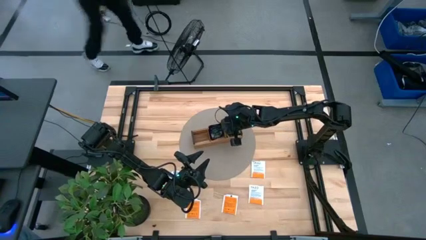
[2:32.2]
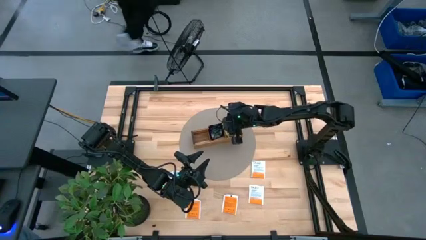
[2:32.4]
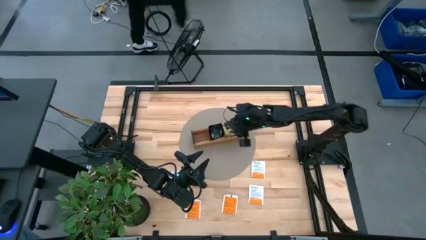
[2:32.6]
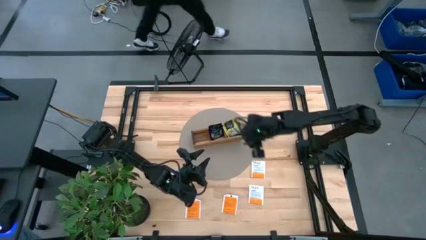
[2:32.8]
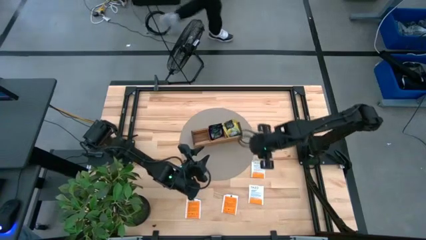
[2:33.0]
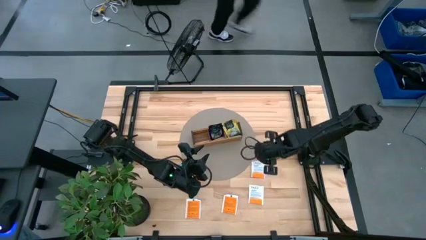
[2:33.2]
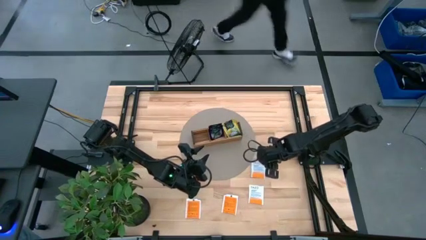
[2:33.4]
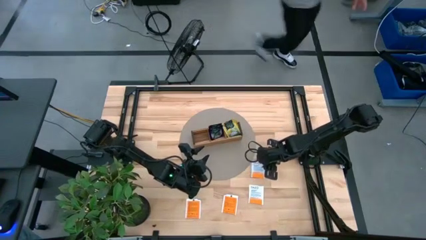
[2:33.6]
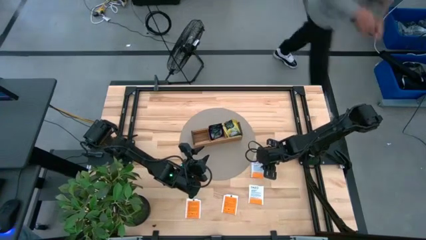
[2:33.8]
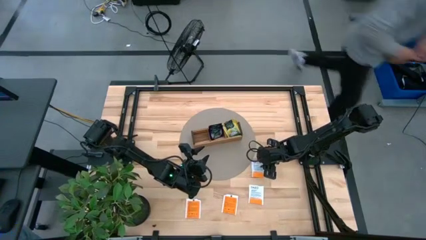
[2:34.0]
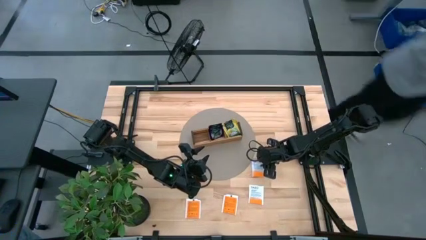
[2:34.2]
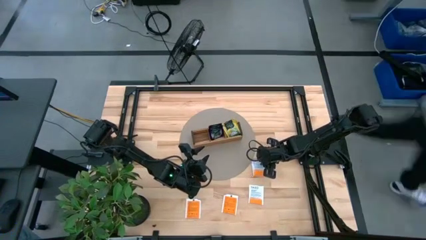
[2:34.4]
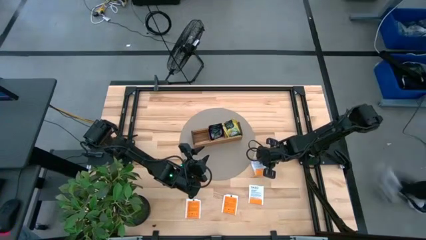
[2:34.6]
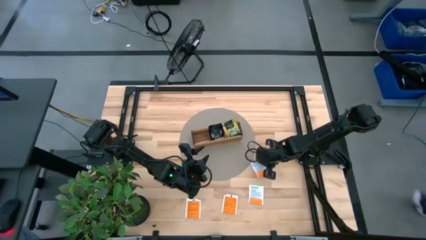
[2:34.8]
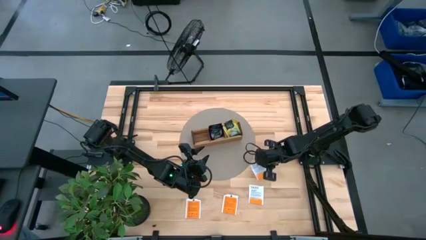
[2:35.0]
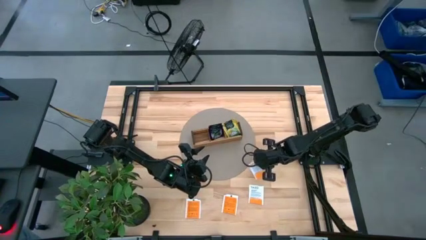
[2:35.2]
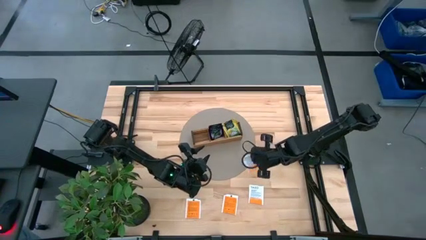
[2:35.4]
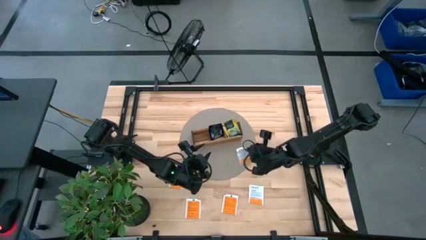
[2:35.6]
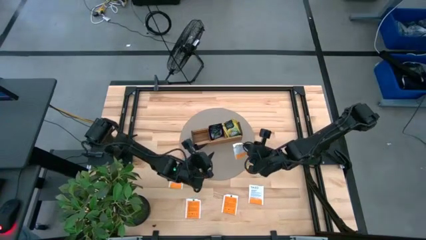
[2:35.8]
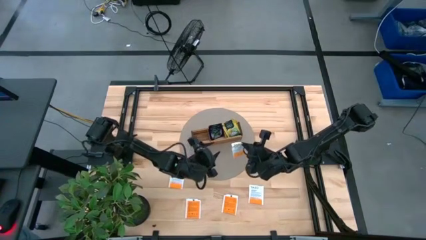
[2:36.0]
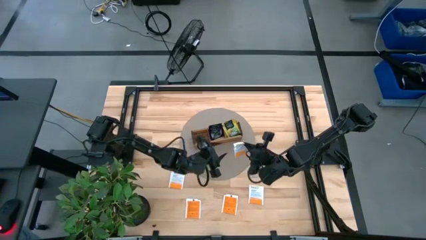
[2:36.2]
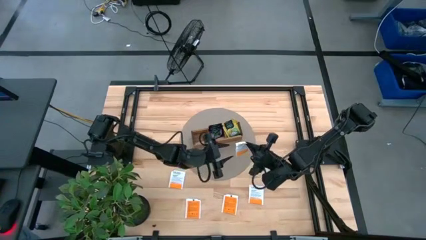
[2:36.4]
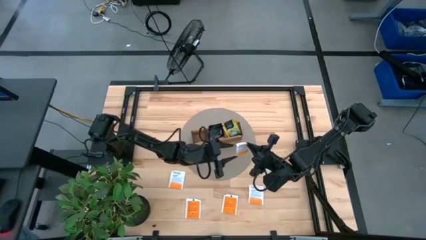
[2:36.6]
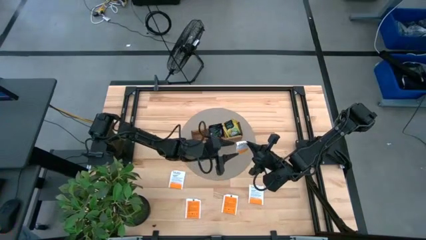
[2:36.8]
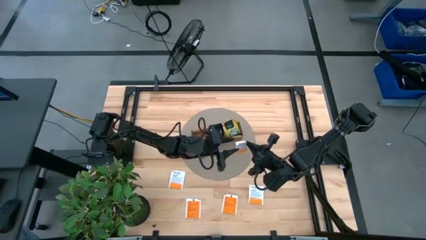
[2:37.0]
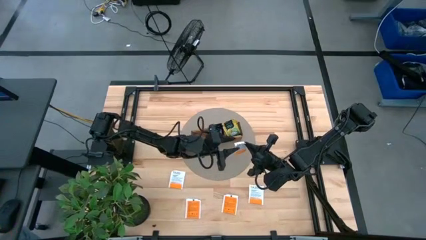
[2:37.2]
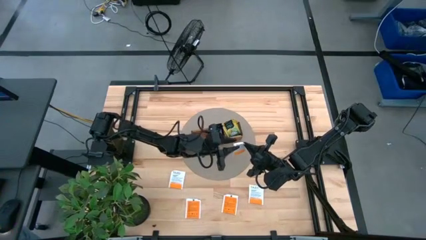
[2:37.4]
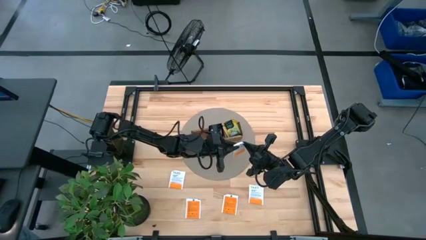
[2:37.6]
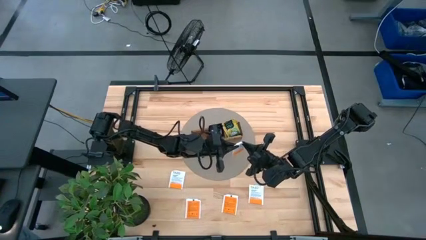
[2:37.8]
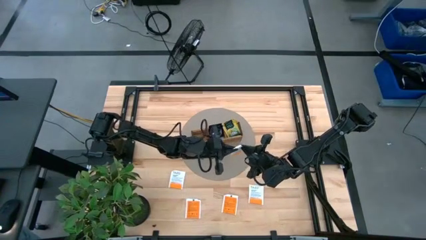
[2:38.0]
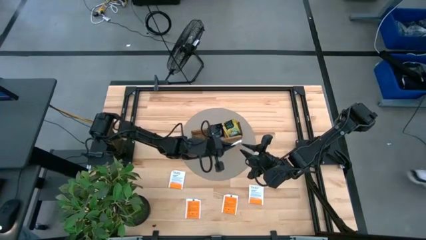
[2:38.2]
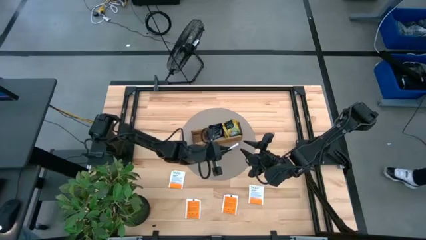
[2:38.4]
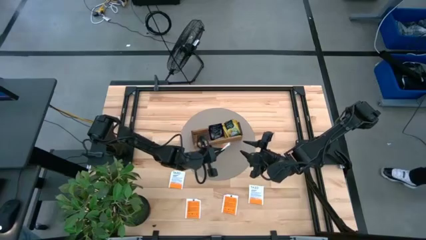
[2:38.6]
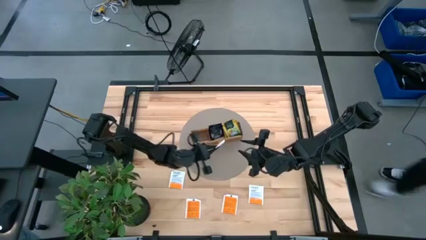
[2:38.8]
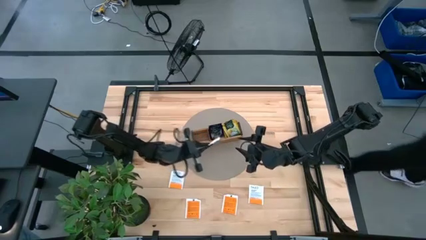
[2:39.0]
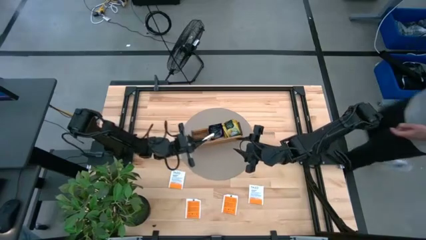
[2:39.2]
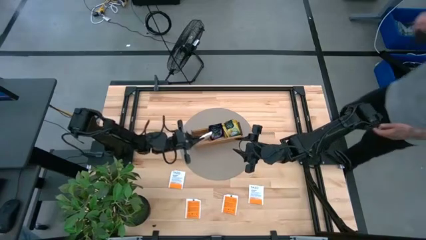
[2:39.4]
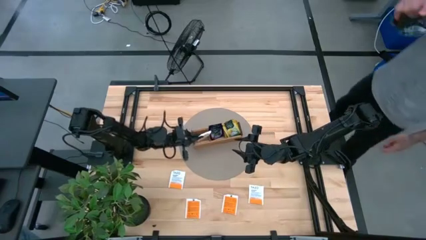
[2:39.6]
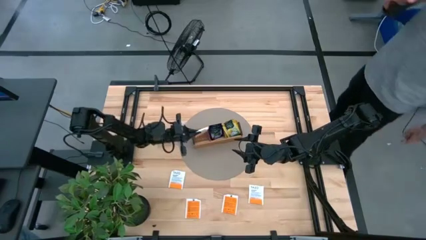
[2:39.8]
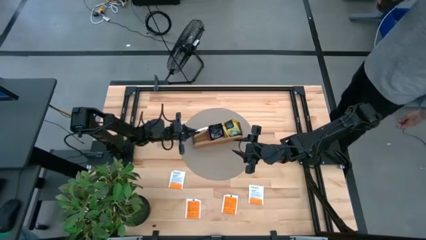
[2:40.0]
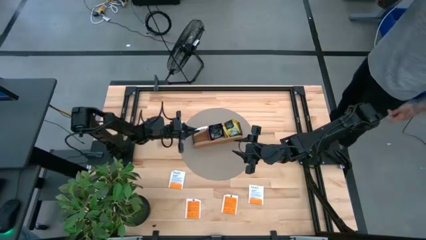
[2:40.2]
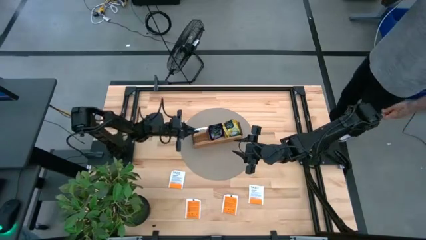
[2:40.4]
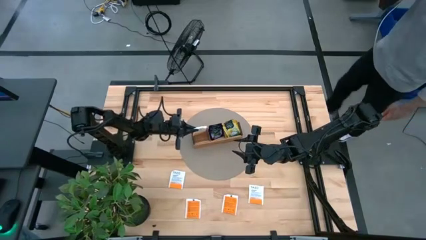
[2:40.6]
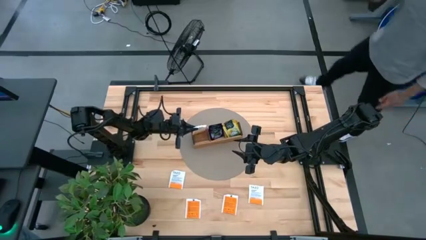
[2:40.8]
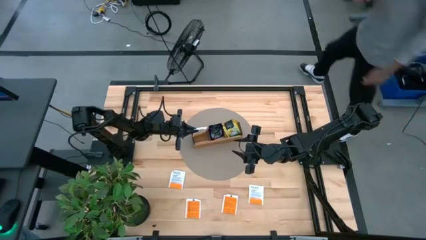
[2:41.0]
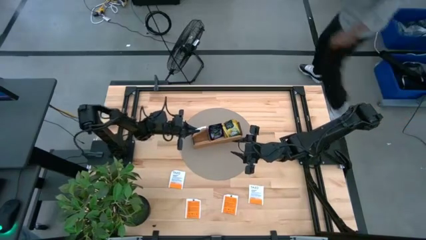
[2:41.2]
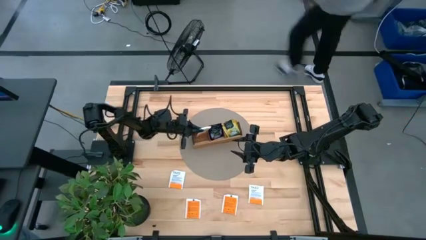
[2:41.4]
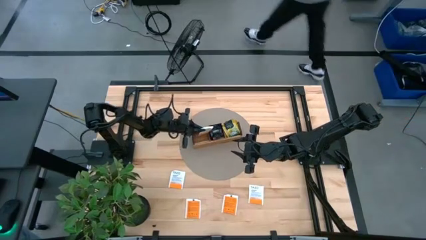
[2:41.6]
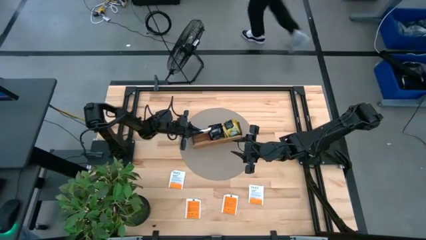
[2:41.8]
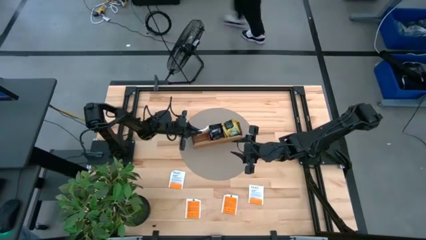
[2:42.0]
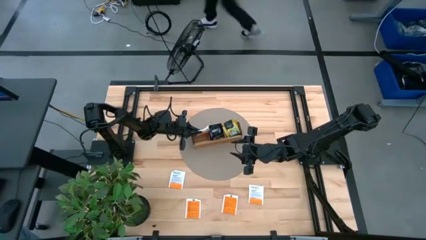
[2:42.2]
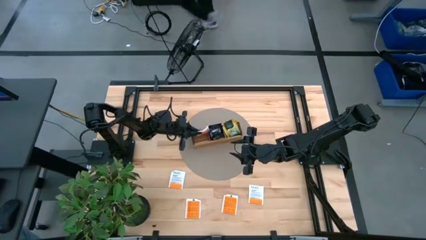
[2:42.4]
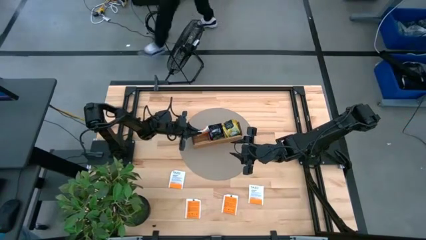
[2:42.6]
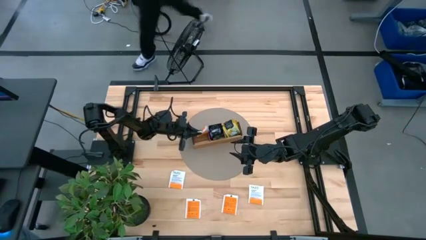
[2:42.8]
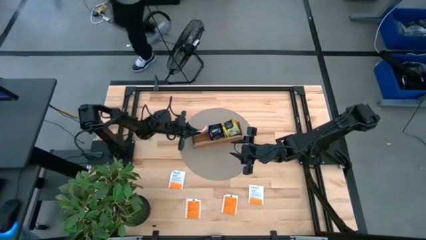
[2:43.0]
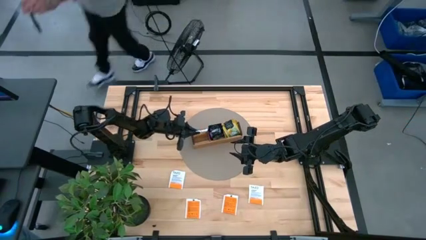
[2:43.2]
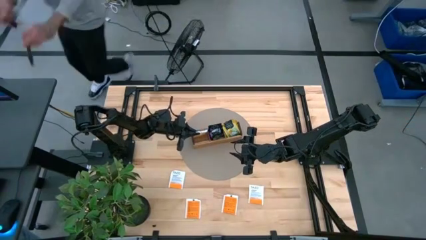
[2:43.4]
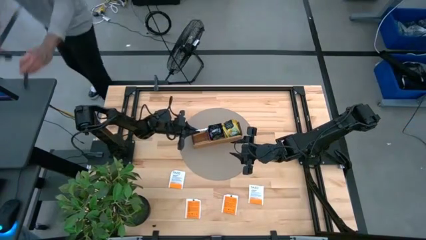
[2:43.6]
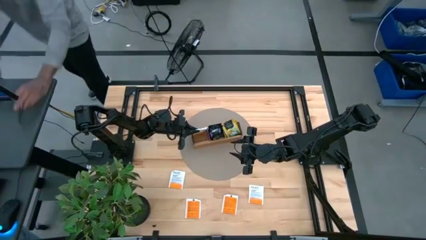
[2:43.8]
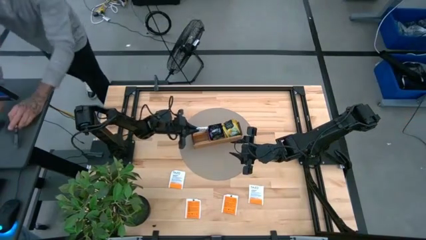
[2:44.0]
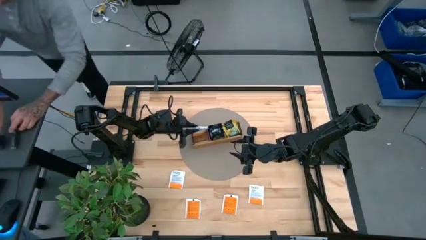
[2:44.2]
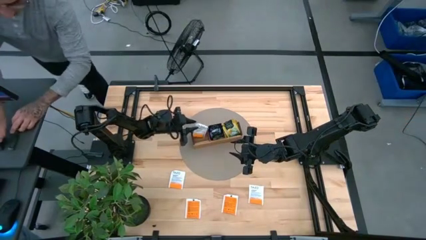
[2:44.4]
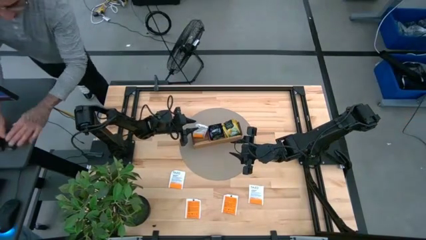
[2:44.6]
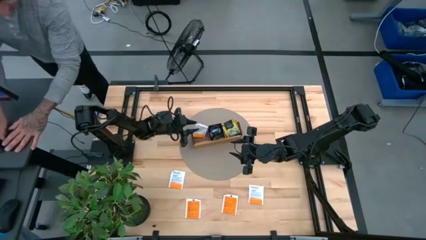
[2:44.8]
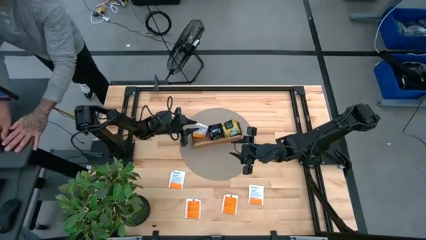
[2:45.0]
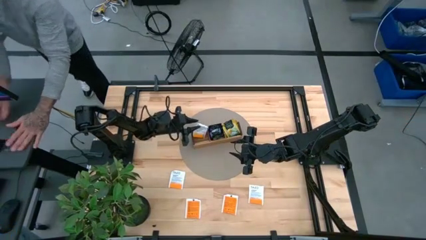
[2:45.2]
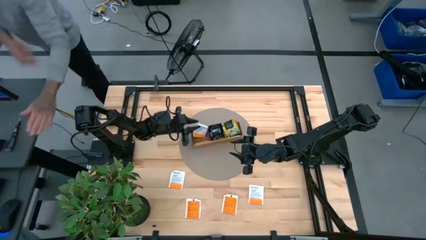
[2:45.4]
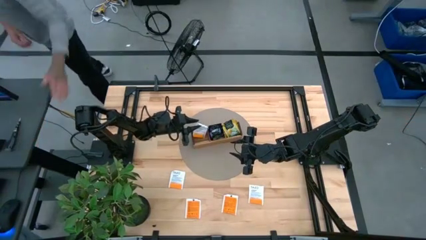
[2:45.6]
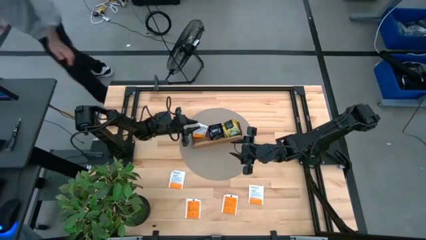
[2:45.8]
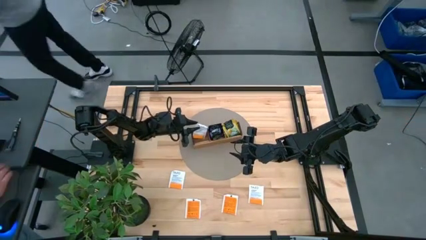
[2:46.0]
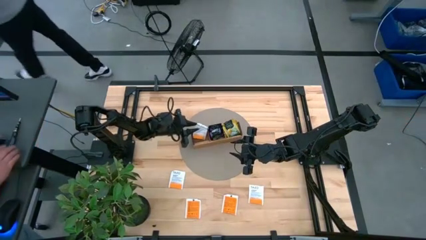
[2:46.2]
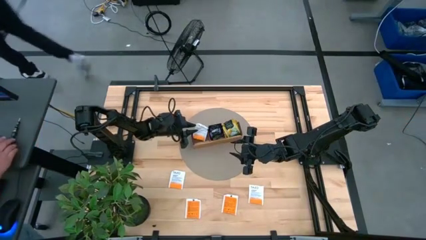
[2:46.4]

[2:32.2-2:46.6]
Task: Pick & Place Tea
Put the white tea bag into the left section of the wooden organizer
